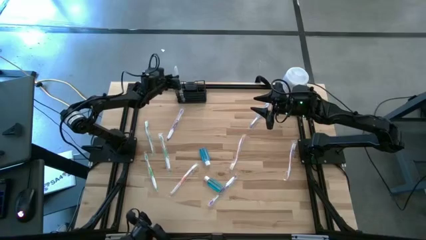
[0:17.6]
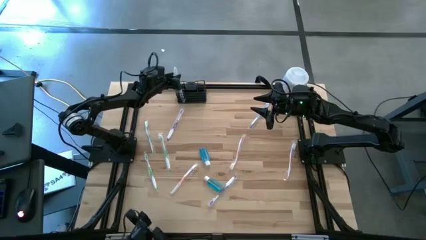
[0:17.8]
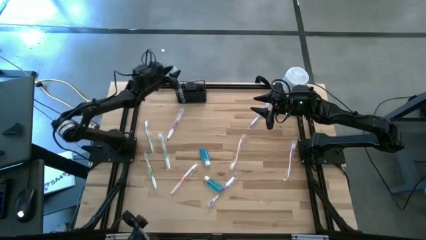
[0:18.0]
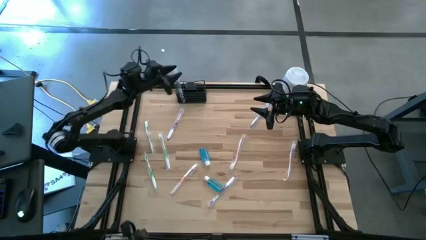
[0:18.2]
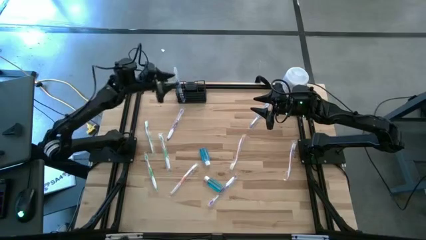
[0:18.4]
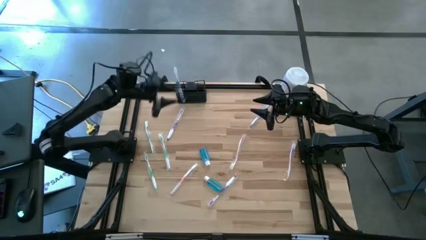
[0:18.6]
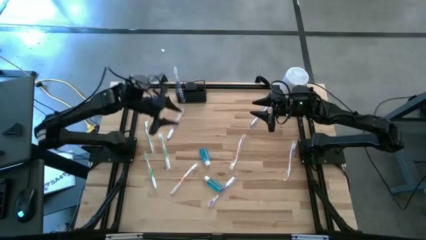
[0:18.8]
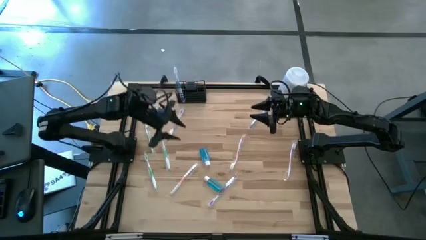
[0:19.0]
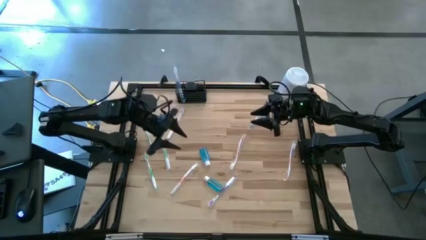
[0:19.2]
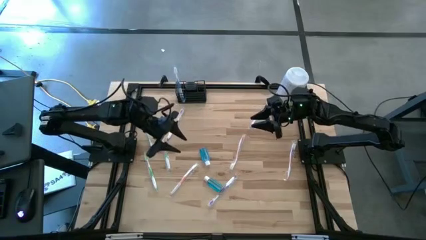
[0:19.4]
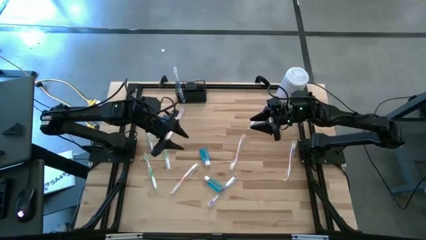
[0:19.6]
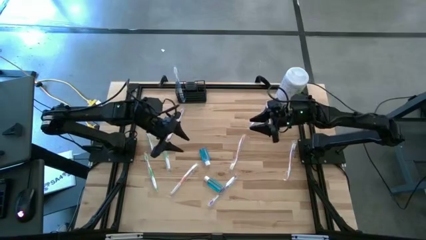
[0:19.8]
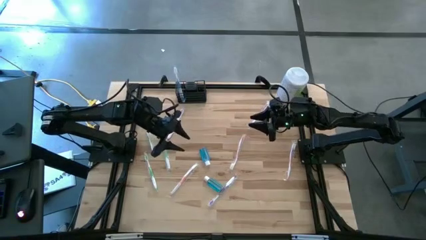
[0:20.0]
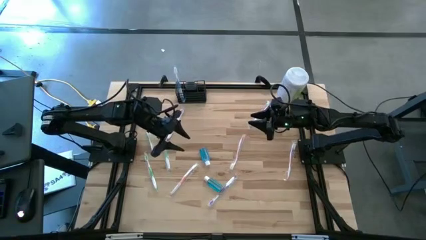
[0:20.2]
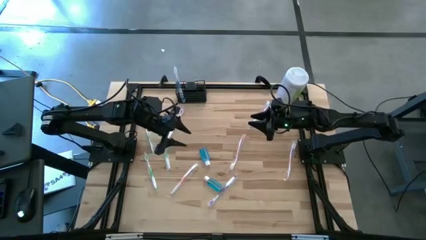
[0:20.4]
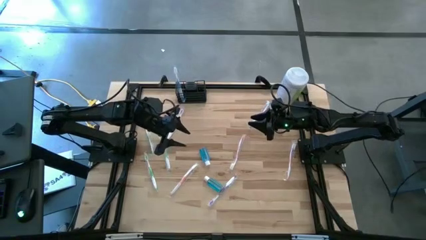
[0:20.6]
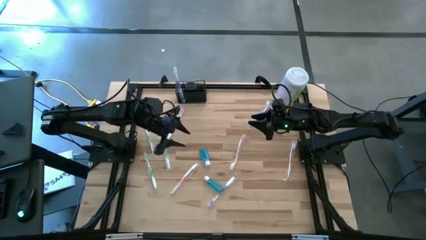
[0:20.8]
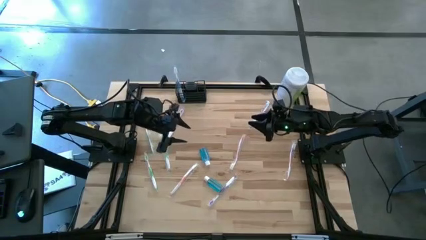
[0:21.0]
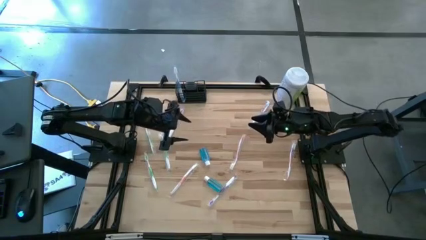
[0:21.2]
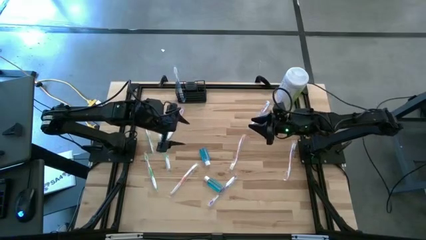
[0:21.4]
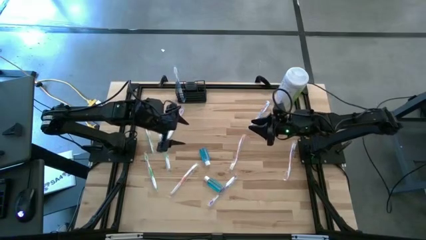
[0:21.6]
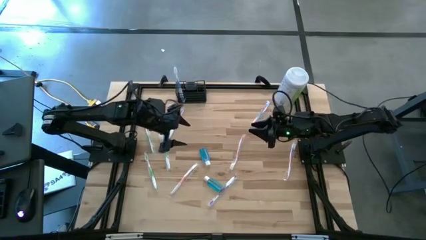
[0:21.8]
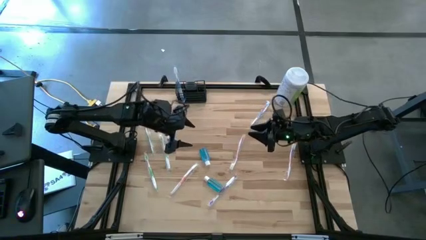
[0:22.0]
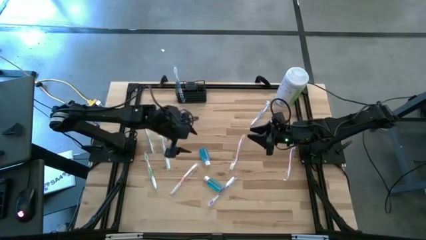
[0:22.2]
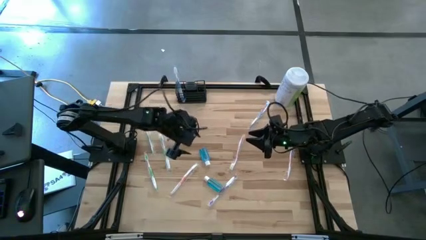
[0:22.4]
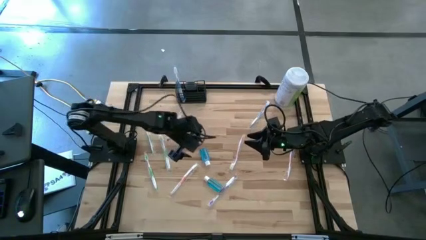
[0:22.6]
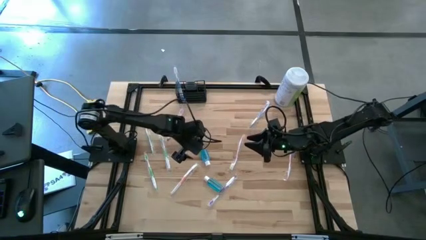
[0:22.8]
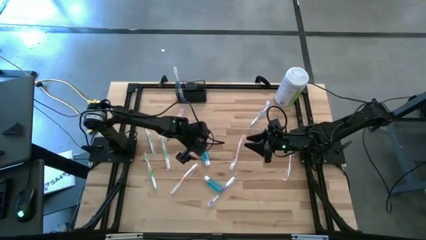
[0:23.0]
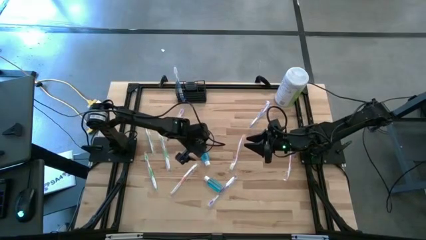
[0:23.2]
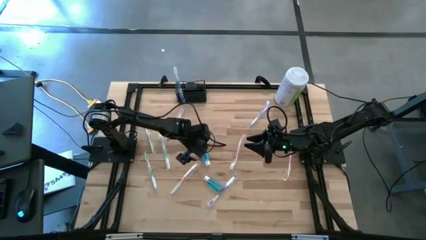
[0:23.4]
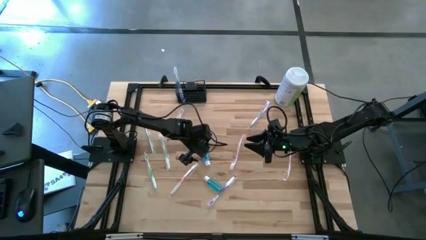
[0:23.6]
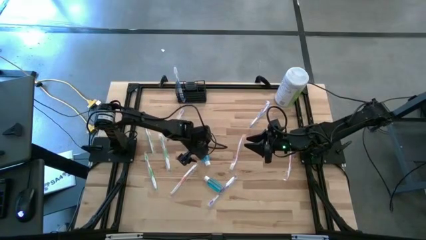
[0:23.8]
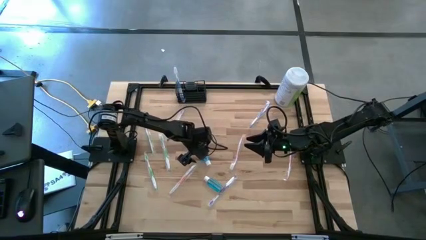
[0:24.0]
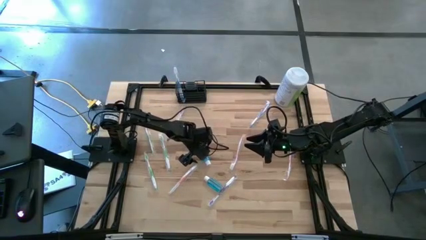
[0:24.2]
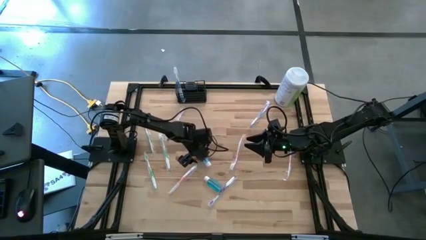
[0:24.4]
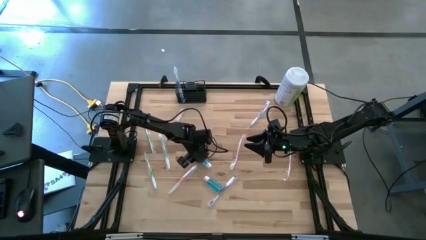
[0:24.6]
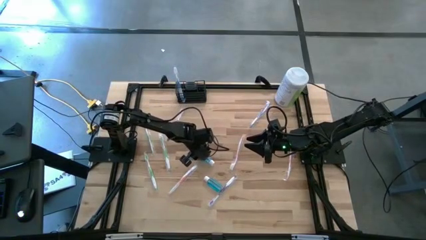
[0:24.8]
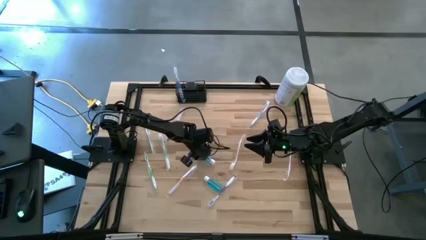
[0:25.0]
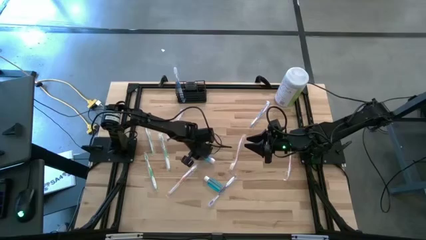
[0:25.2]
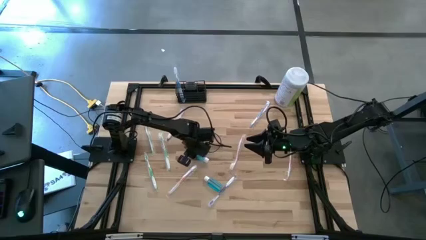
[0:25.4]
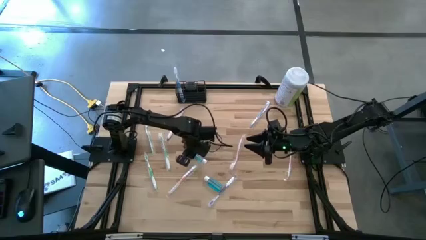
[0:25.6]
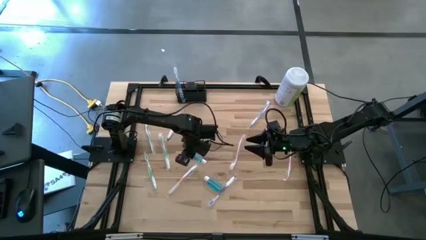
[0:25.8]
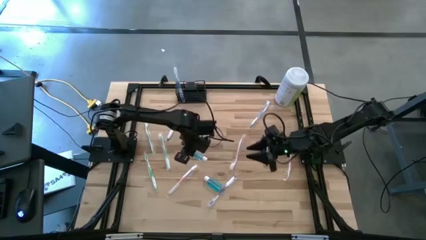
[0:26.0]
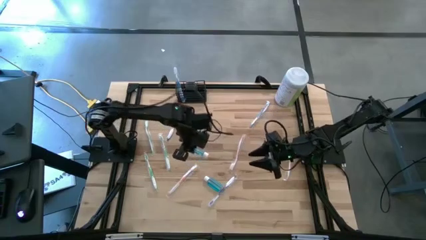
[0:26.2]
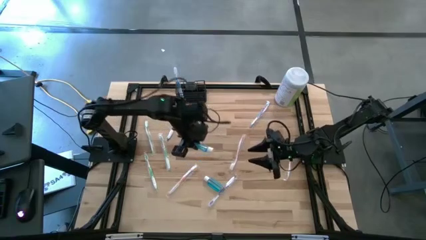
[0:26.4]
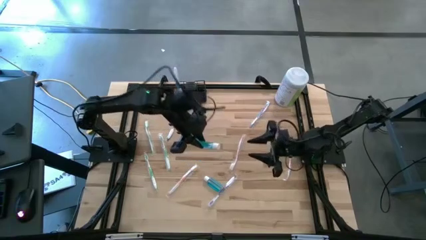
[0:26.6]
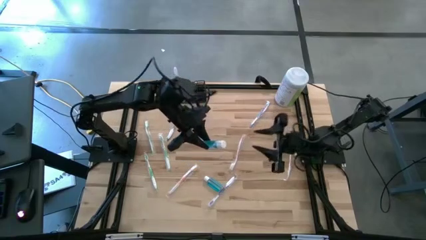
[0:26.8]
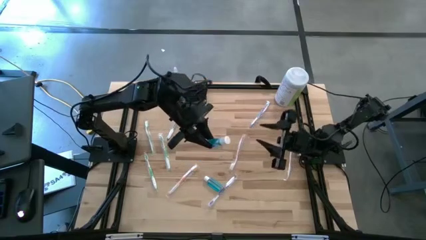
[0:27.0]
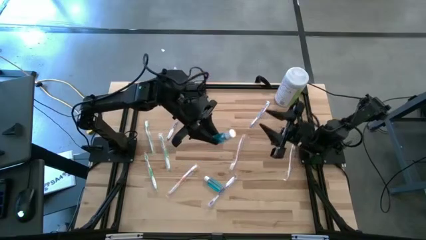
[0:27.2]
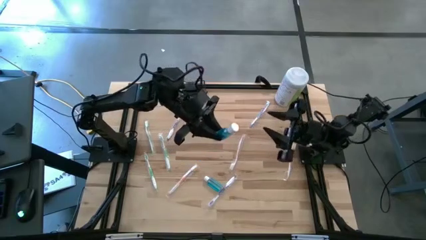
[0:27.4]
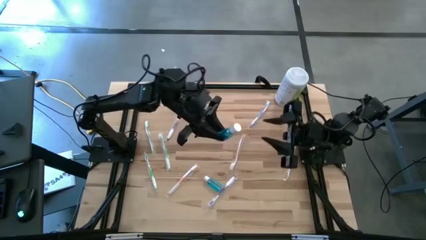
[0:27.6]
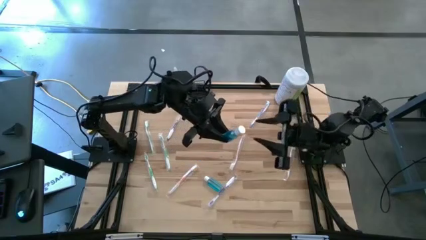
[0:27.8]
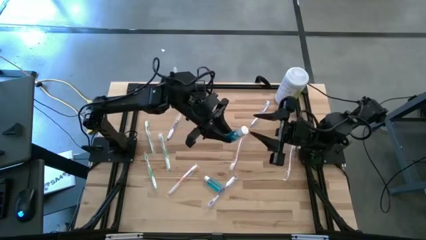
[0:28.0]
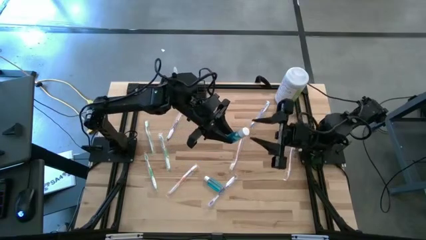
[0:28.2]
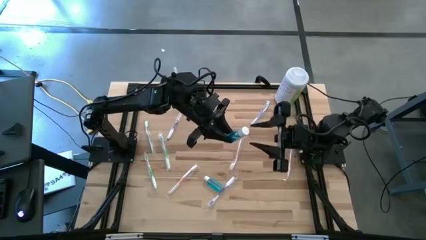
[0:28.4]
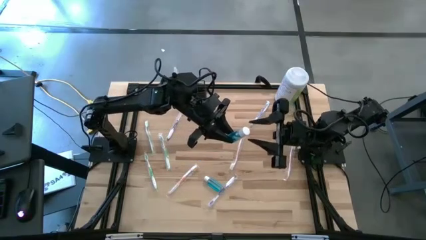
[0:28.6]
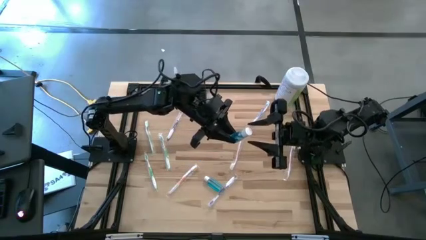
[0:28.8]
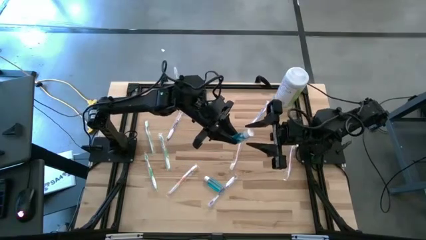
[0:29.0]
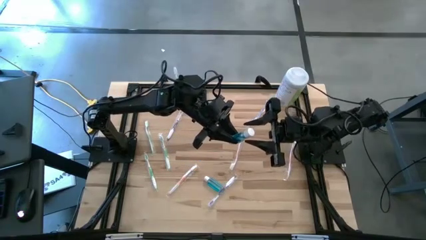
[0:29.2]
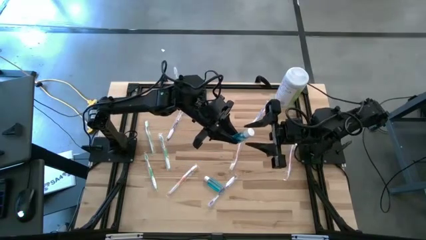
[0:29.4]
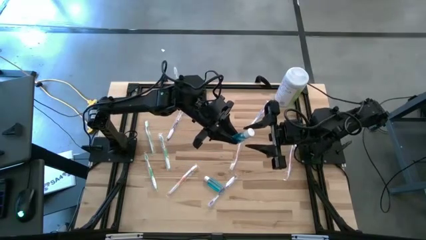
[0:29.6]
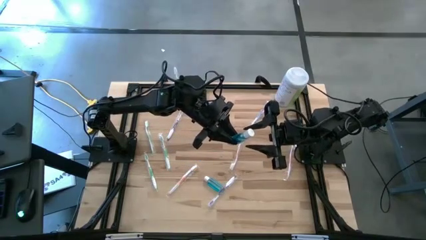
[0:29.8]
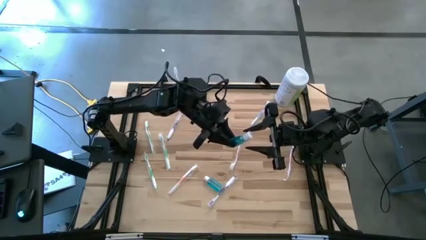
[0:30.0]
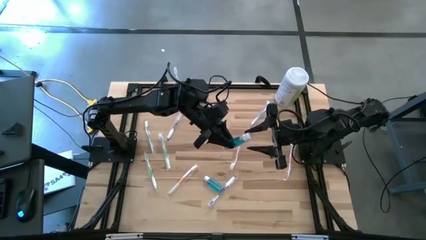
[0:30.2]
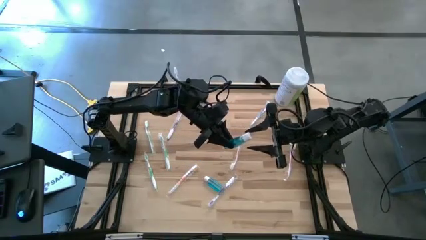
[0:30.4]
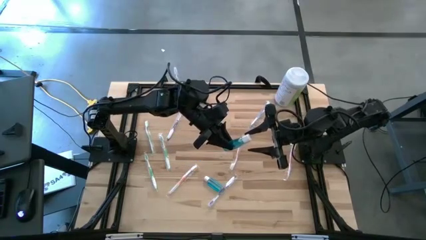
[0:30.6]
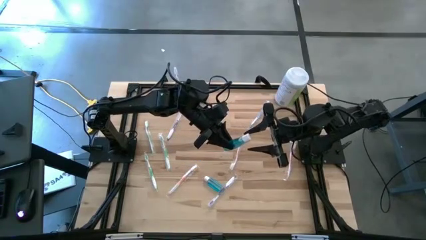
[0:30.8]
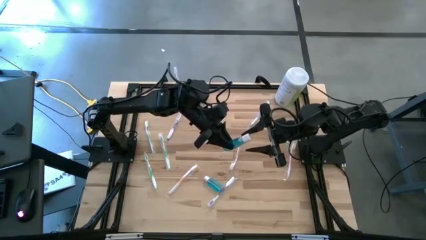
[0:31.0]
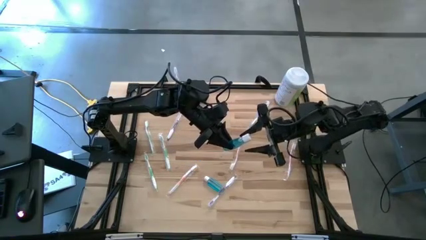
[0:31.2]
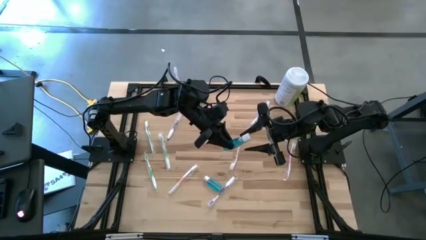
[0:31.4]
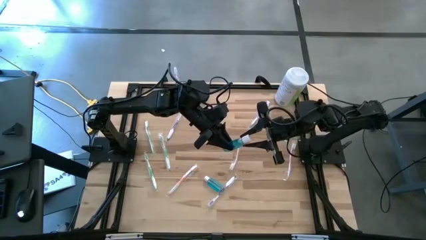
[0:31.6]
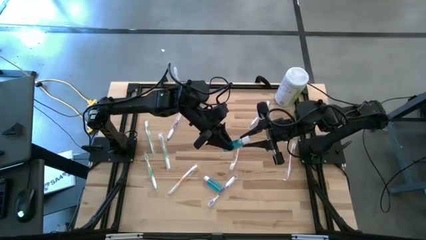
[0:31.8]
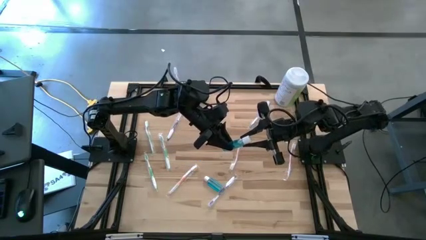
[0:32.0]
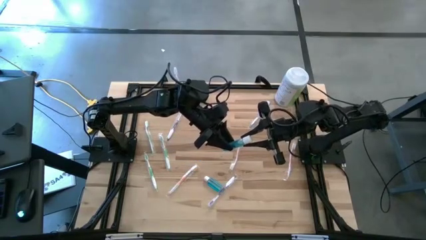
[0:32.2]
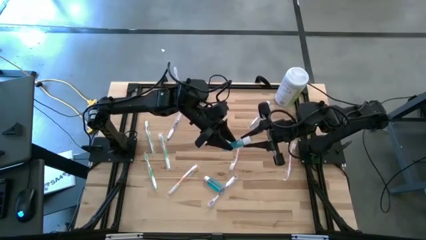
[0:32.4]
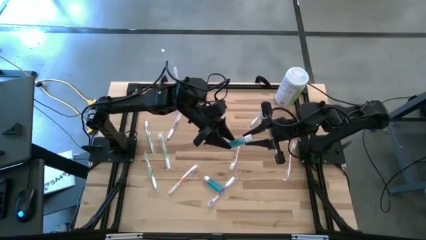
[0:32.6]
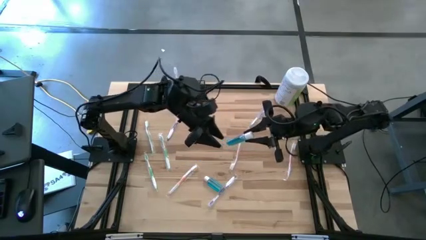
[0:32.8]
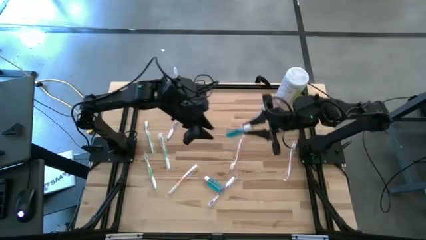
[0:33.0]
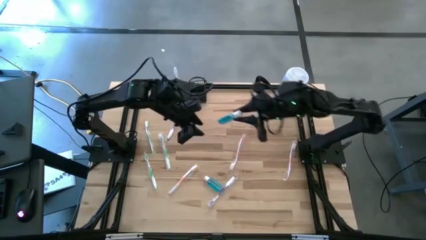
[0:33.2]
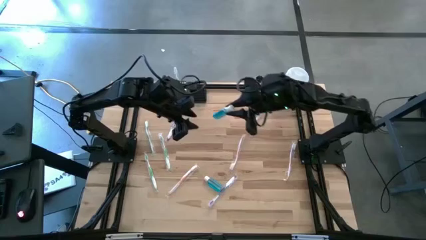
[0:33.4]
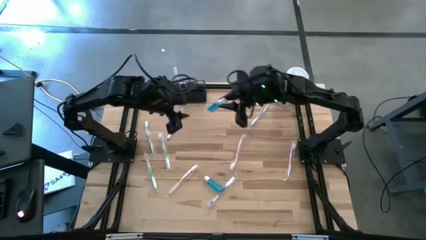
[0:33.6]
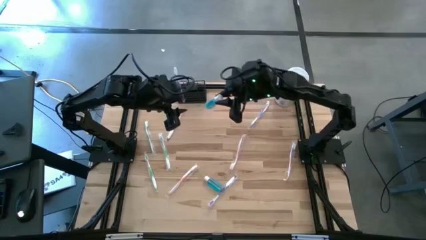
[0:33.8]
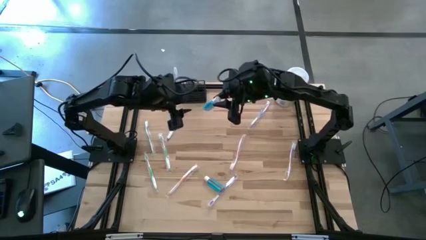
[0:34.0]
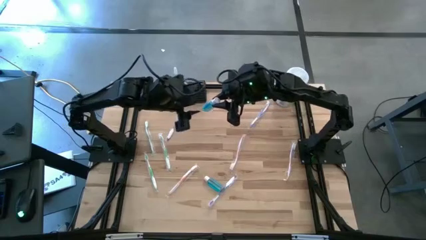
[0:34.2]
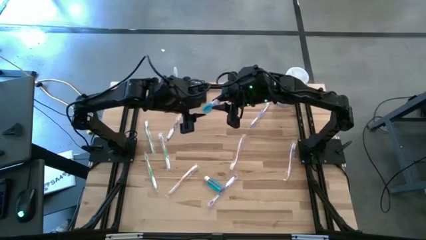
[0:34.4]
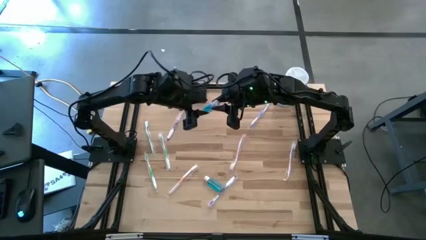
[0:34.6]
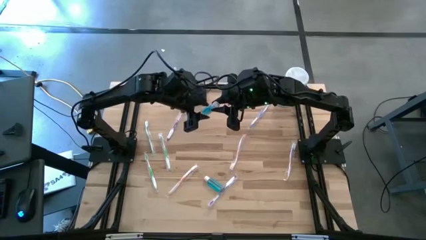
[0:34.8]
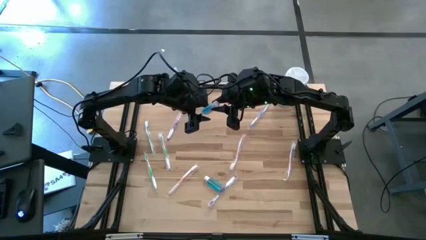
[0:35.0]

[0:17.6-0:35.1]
Task: Pick & Place toothbrushing station
Put the top blue mouthwash into the black wire organizer
